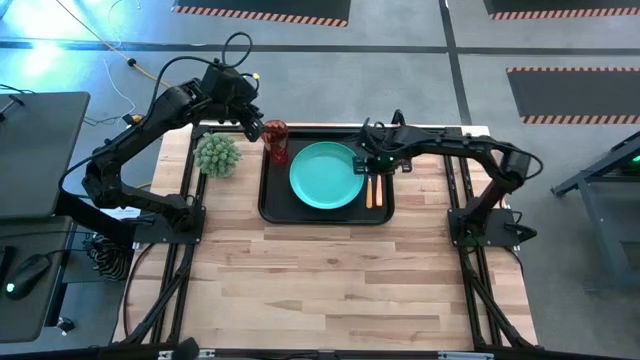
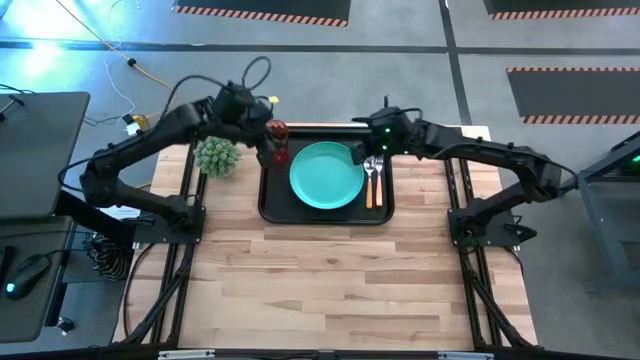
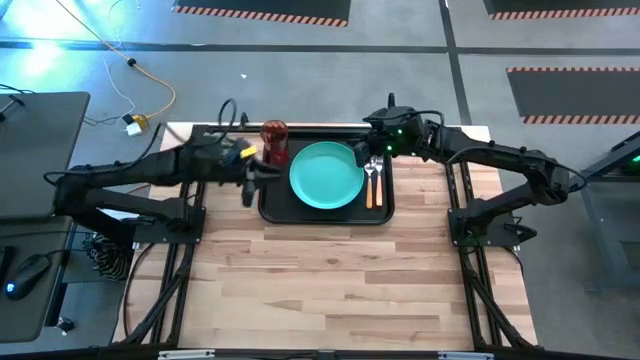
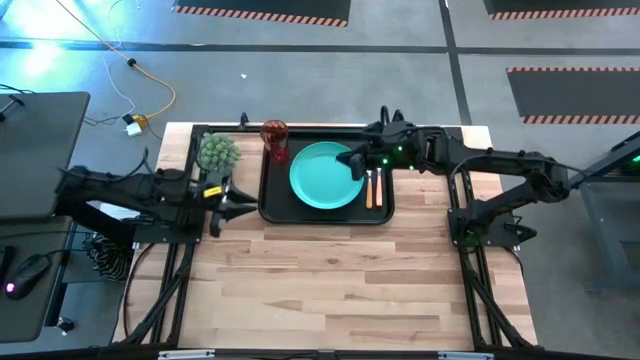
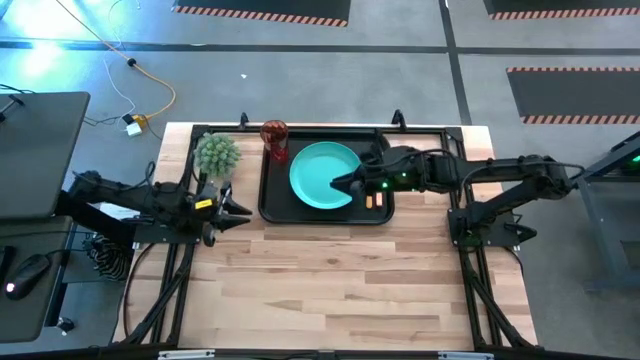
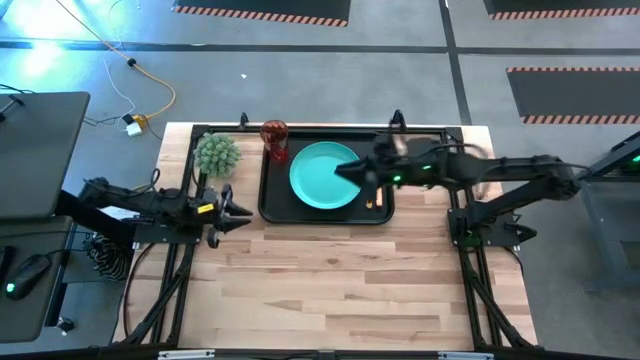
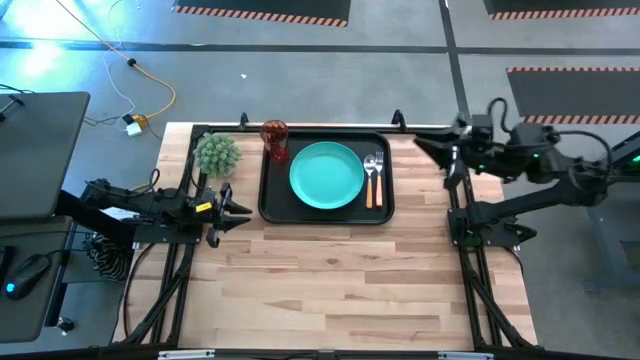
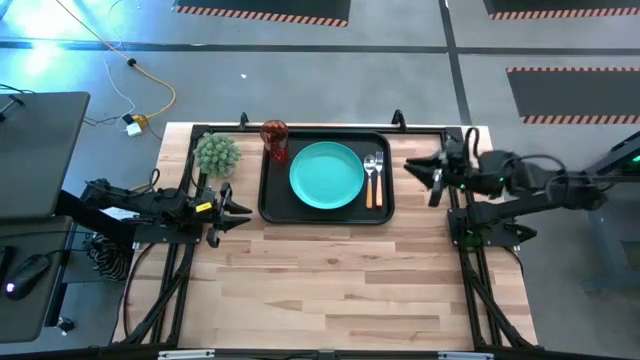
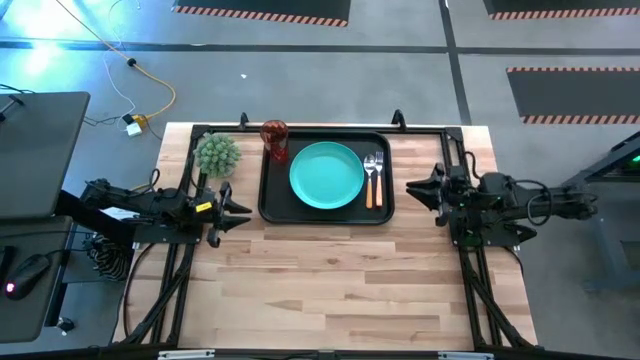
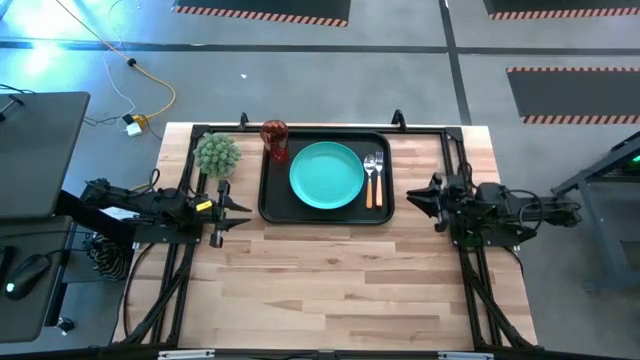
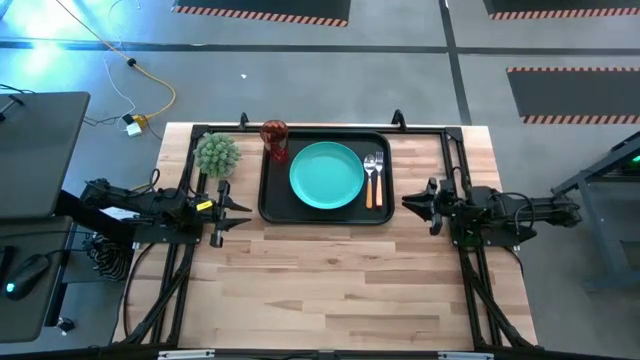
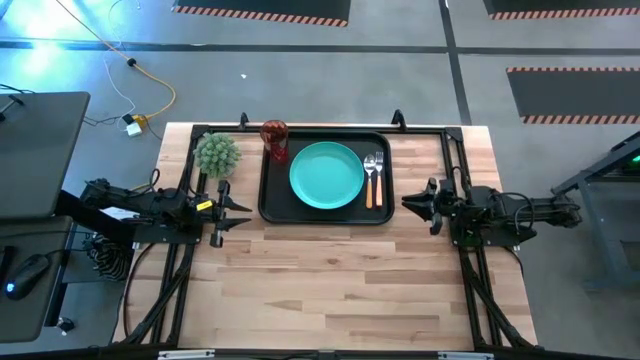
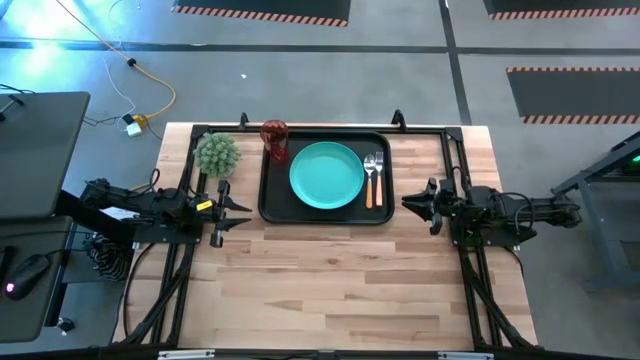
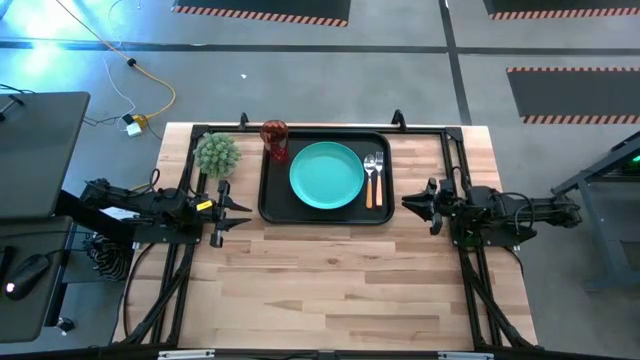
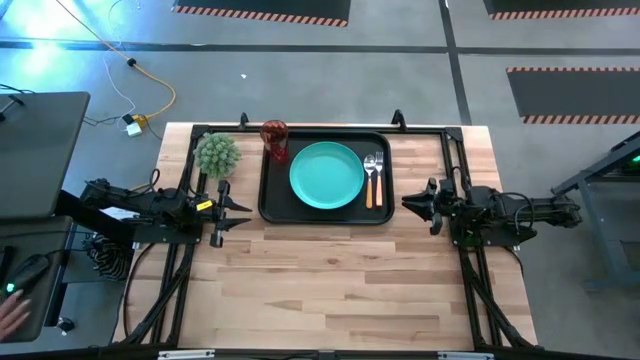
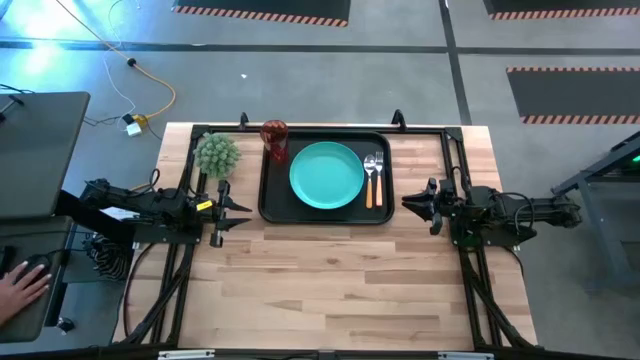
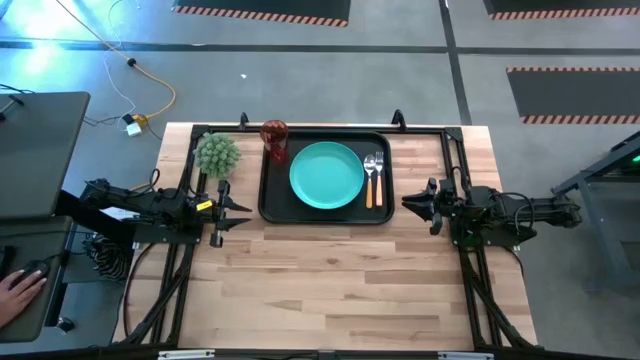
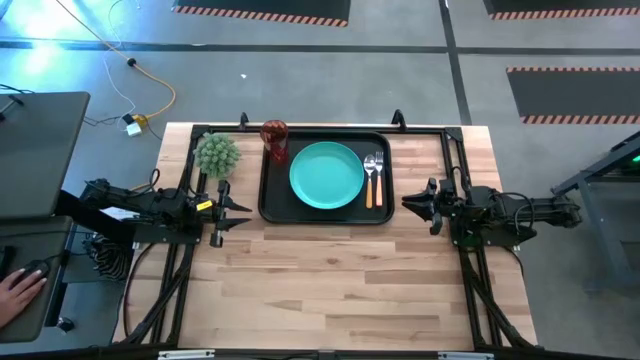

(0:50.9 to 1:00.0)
Task: Pick and place plate/cup/fork/spoon on tray
Return to Home Position

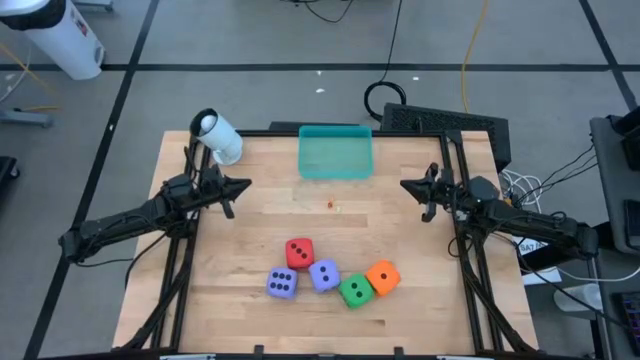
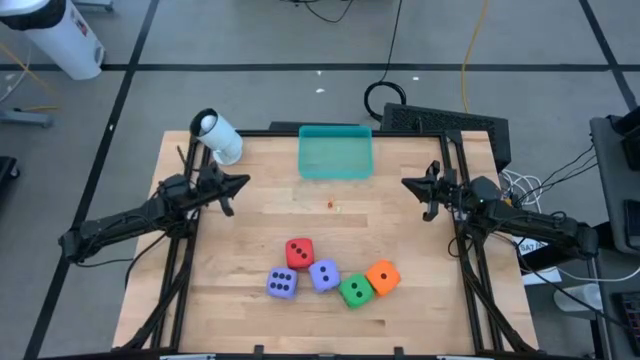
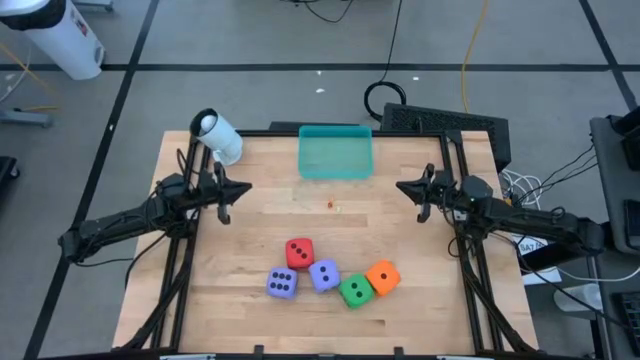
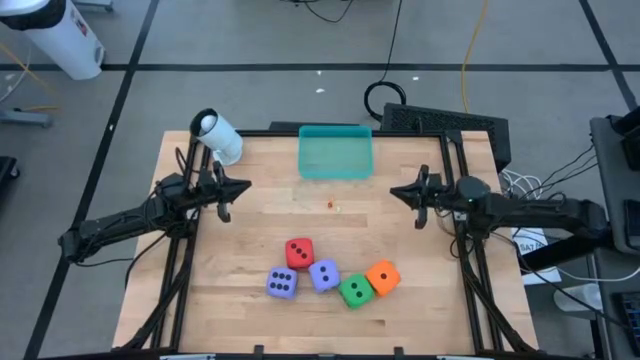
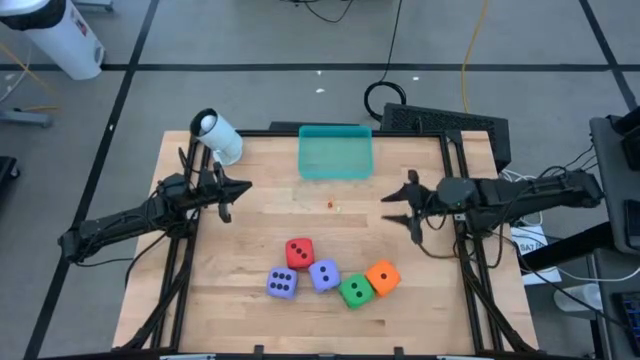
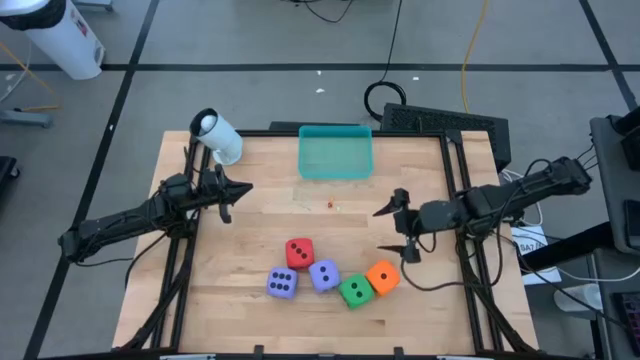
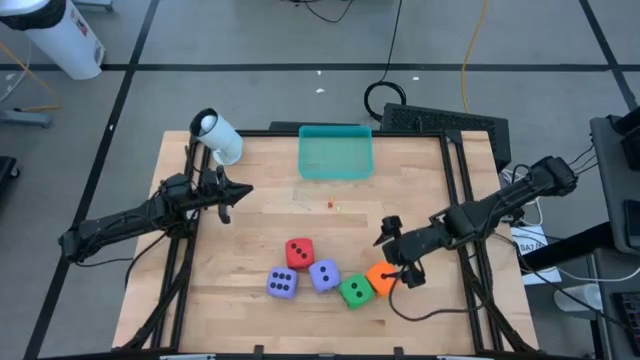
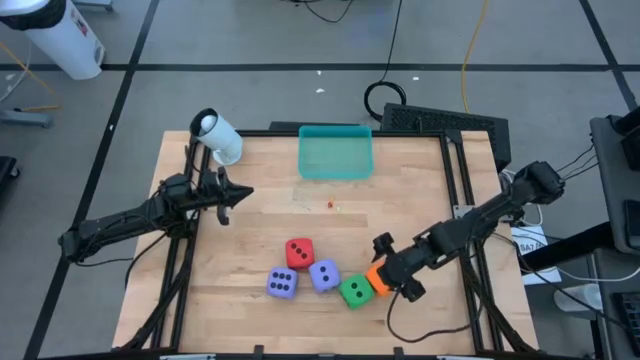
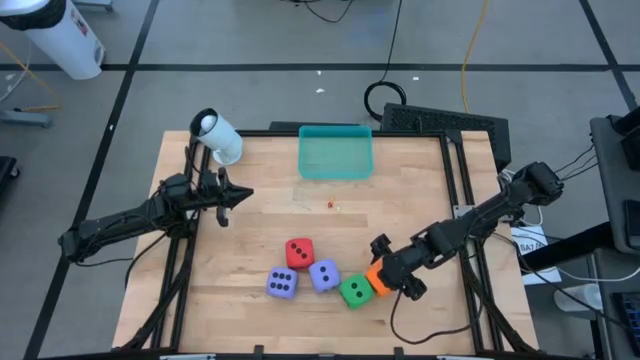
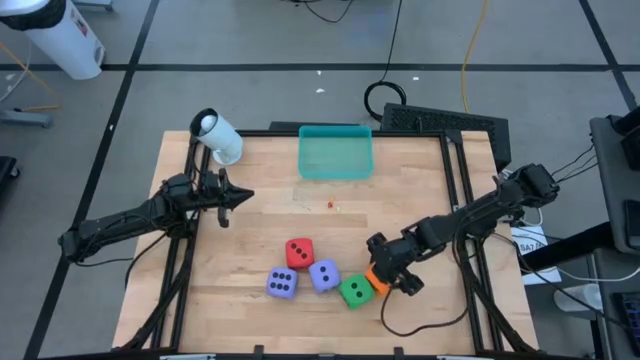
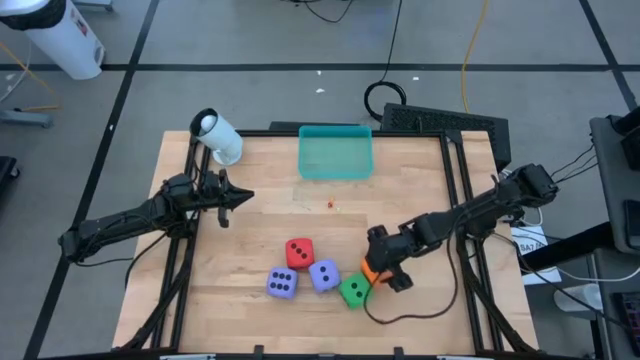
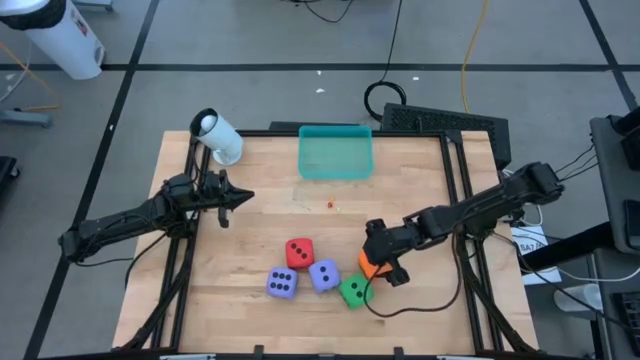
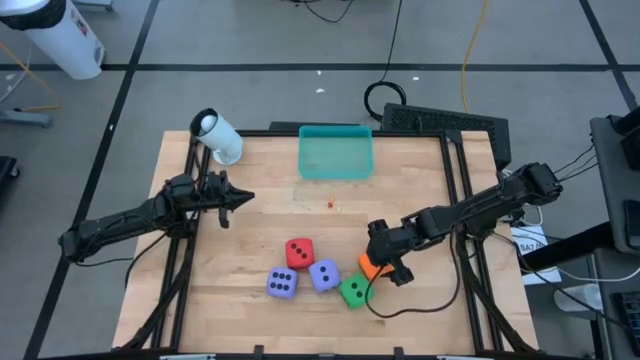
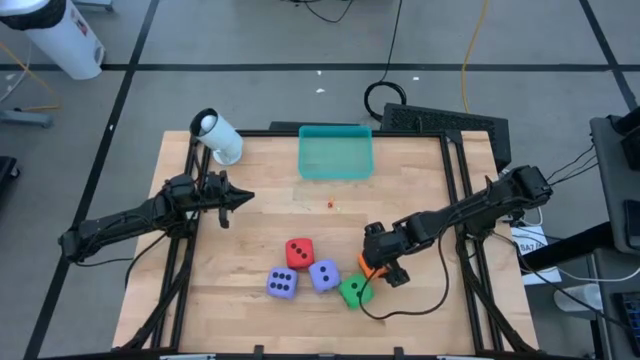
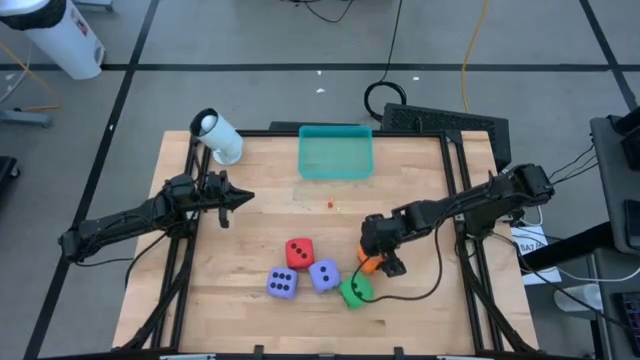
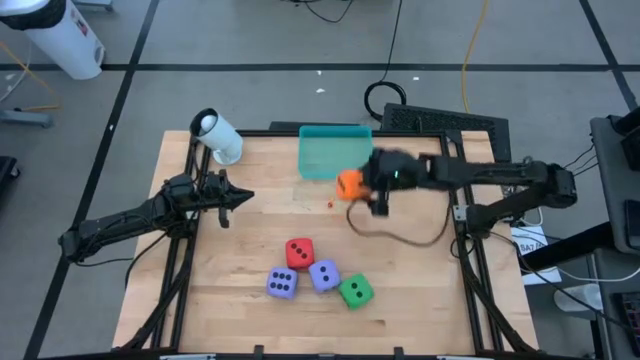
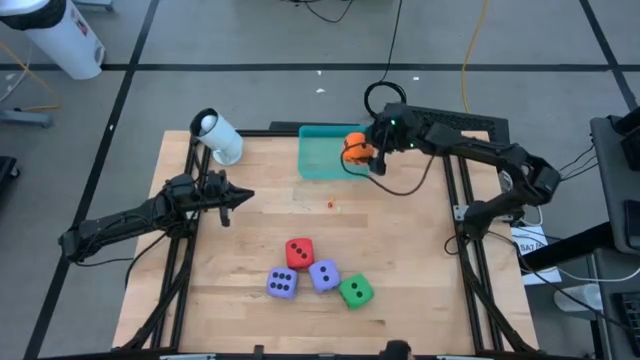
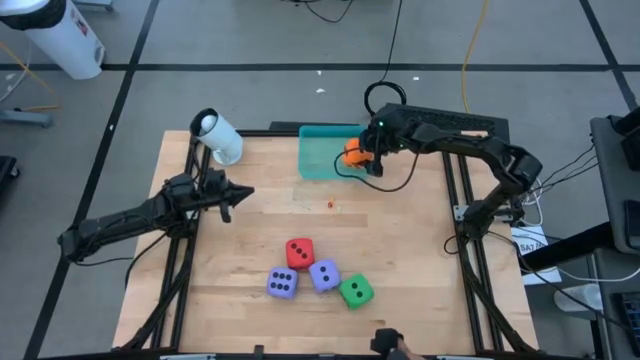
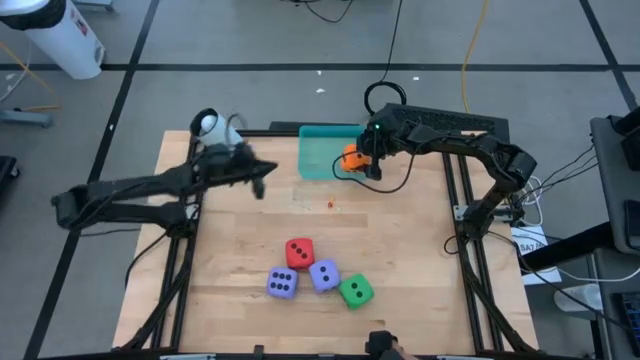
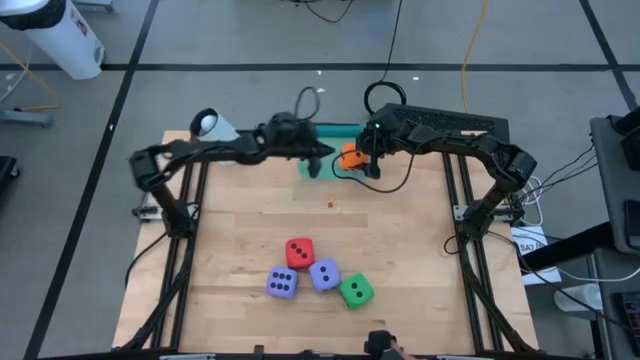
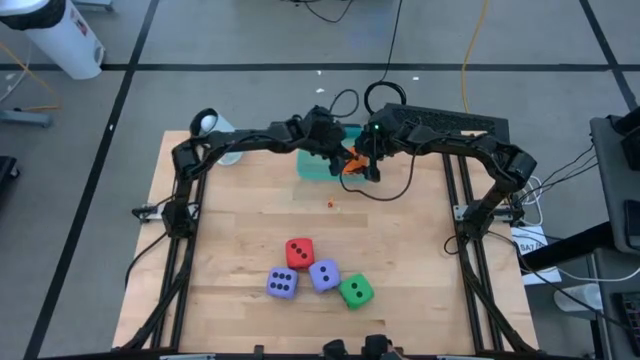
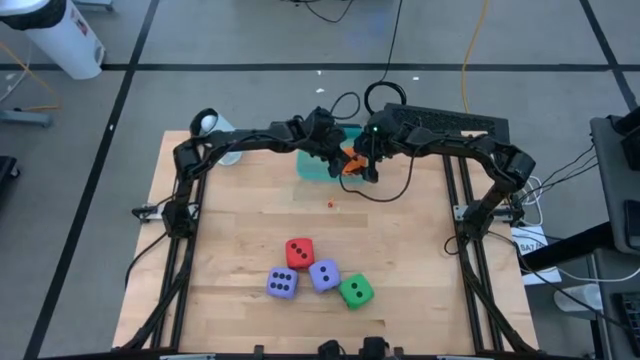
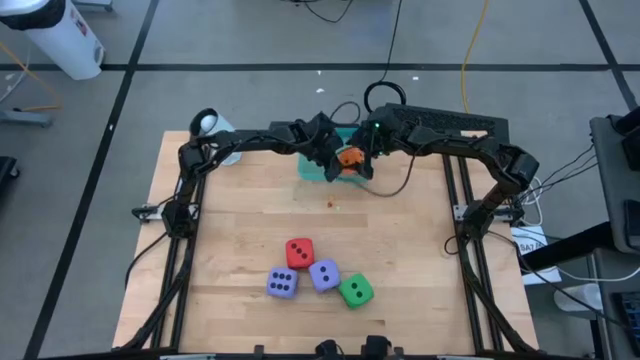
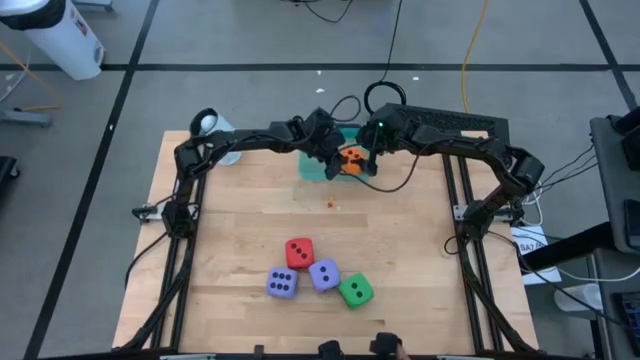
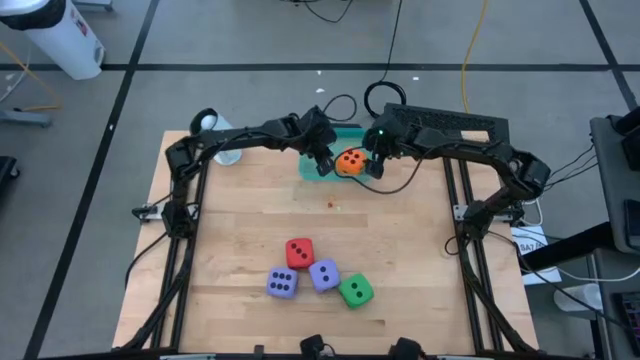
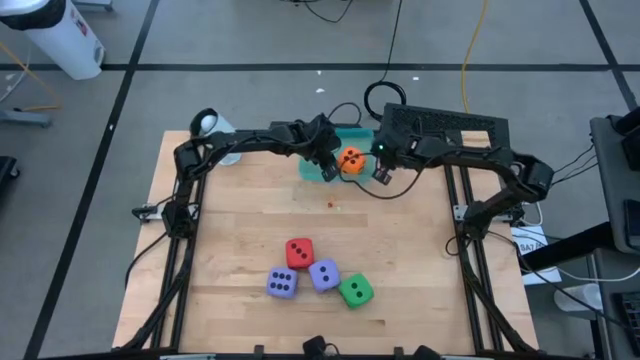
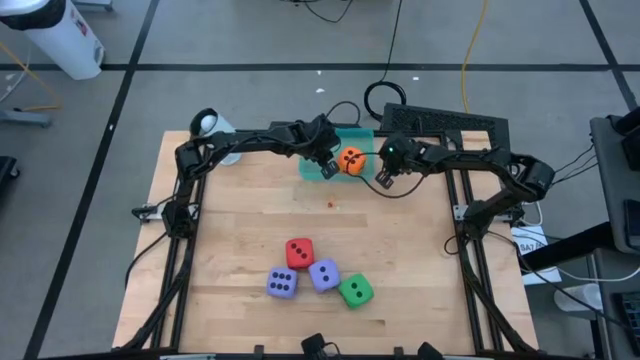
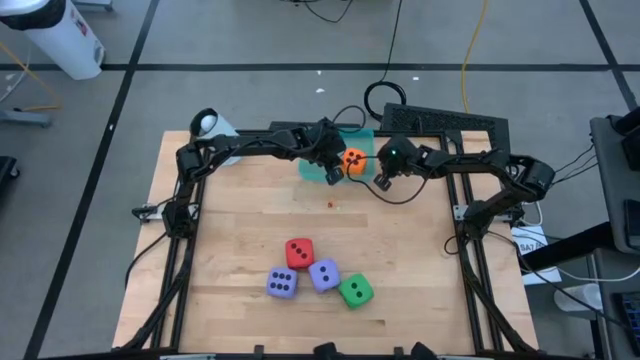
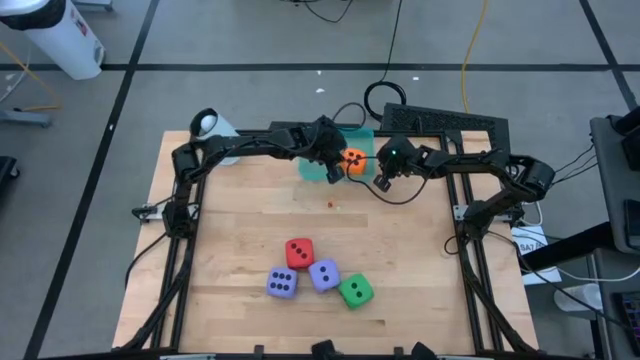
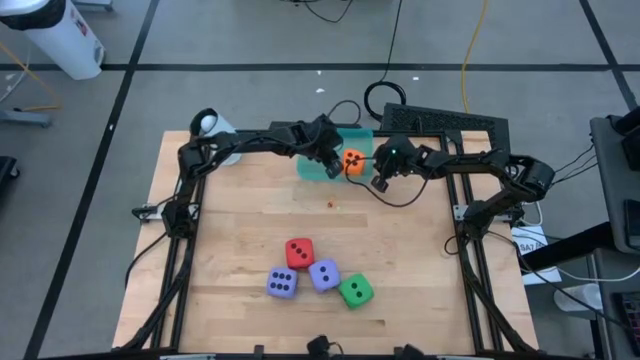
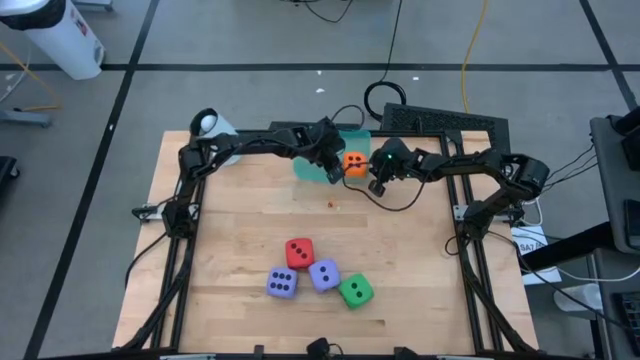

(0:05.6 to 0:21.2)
Task: Pick & Place Dice
Put the large orange die into the blue bin
